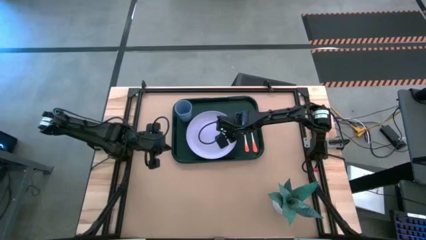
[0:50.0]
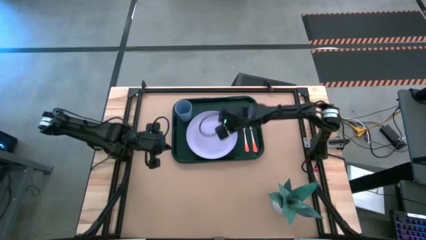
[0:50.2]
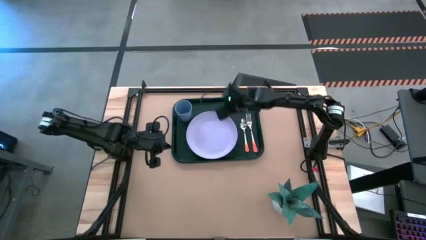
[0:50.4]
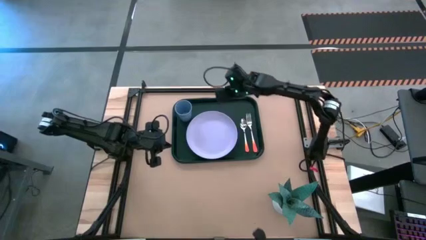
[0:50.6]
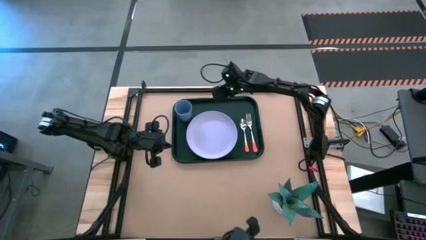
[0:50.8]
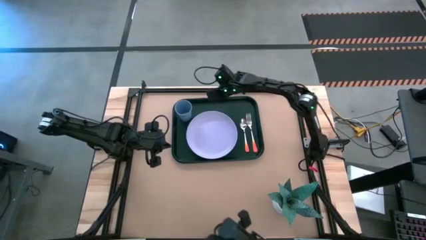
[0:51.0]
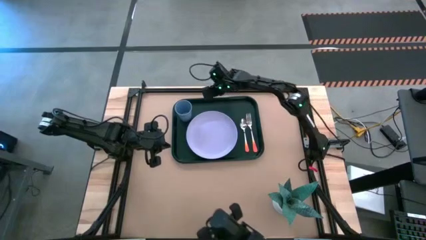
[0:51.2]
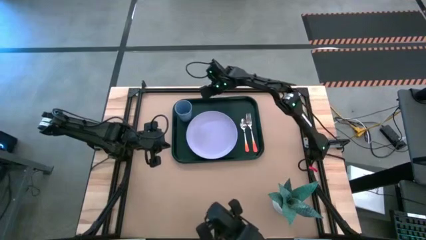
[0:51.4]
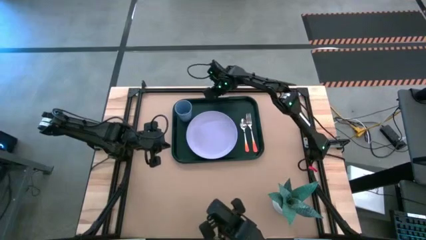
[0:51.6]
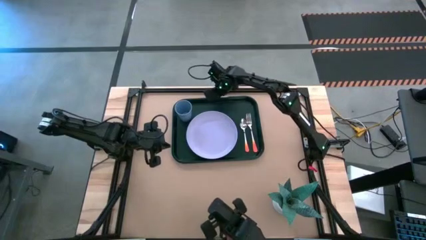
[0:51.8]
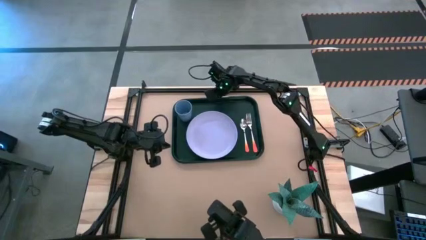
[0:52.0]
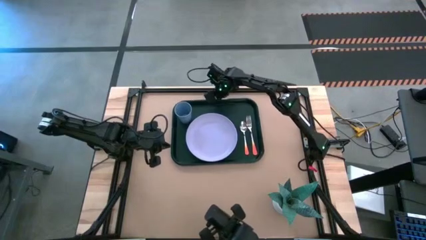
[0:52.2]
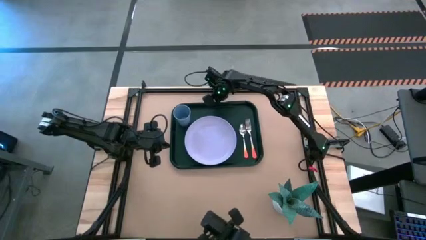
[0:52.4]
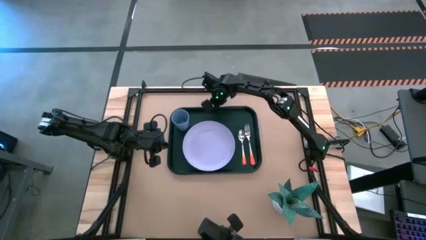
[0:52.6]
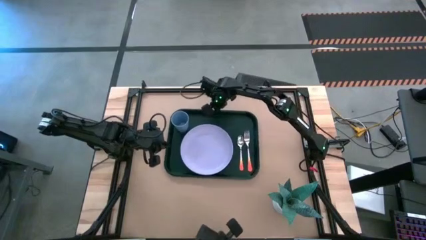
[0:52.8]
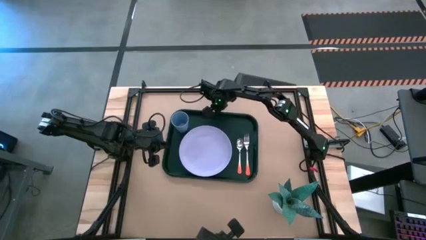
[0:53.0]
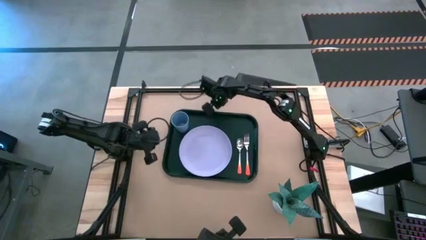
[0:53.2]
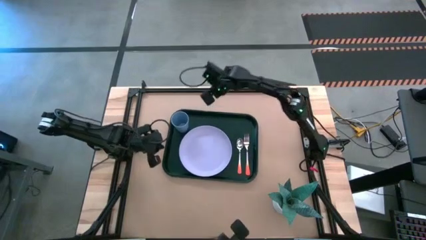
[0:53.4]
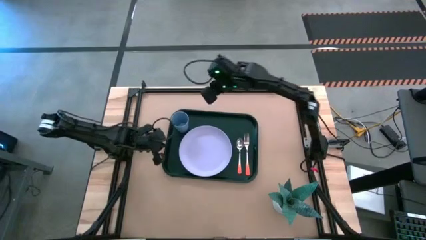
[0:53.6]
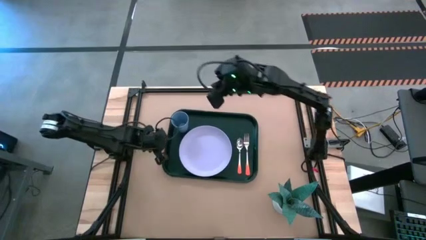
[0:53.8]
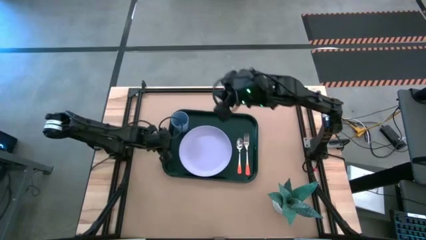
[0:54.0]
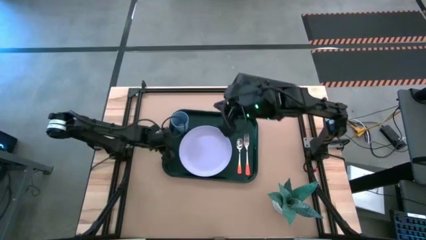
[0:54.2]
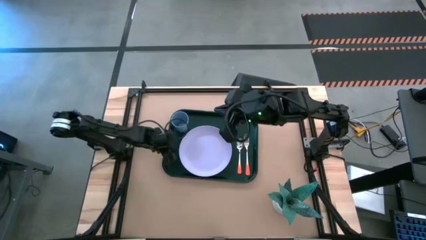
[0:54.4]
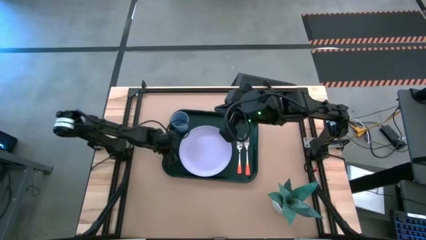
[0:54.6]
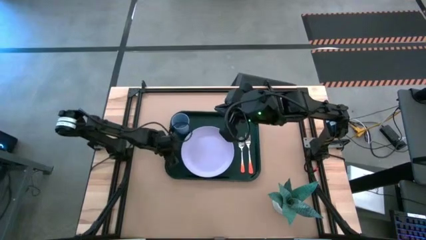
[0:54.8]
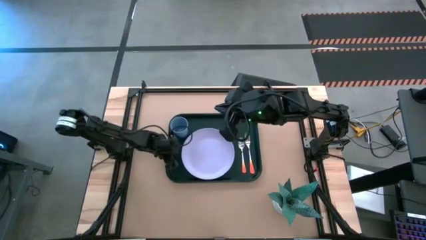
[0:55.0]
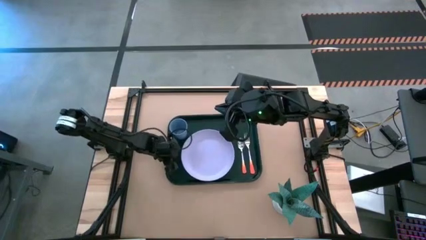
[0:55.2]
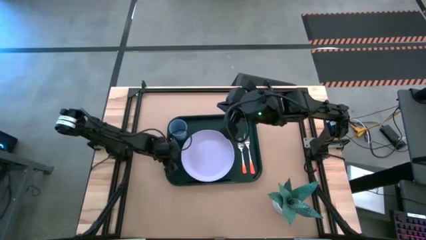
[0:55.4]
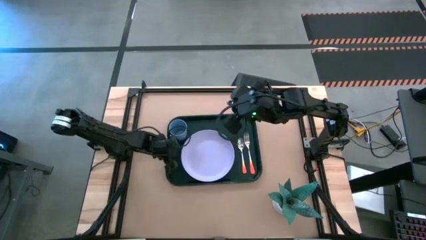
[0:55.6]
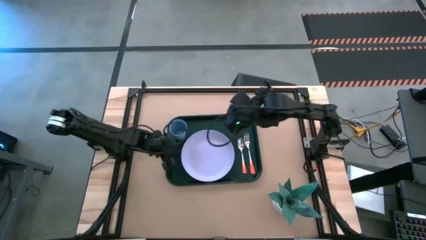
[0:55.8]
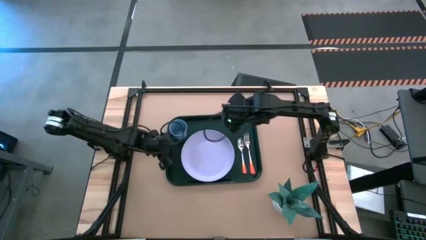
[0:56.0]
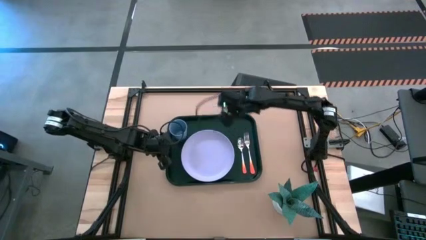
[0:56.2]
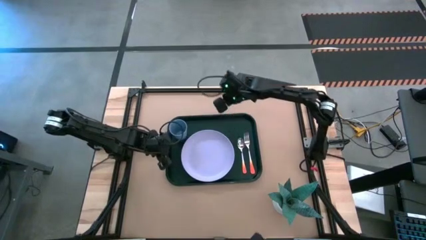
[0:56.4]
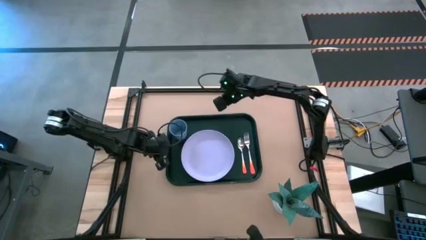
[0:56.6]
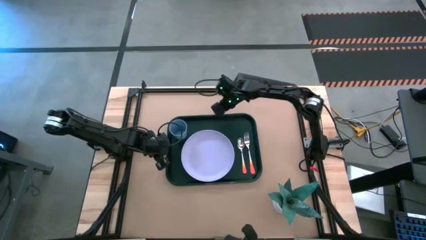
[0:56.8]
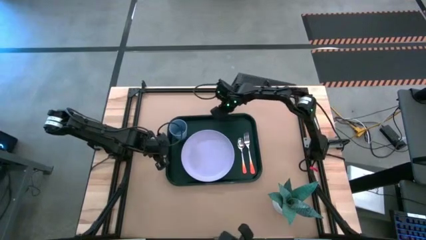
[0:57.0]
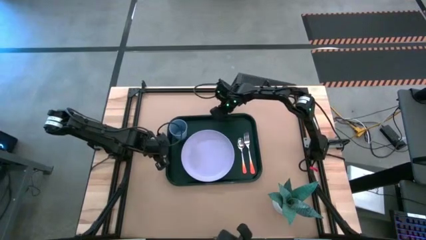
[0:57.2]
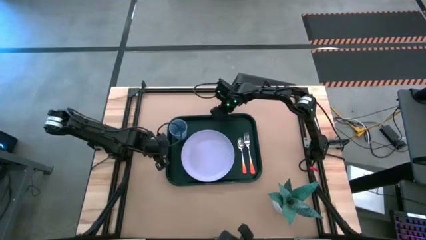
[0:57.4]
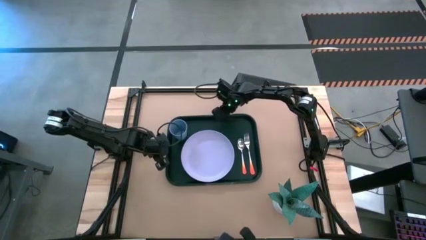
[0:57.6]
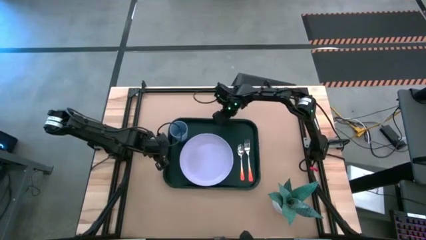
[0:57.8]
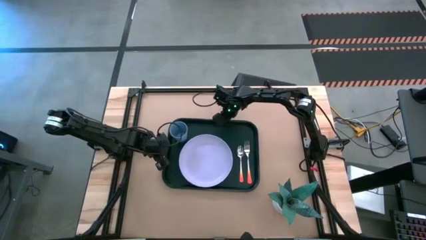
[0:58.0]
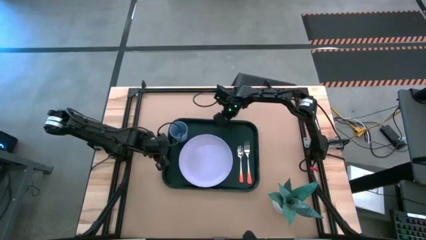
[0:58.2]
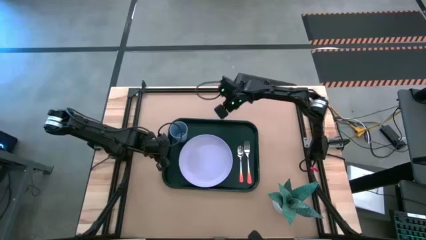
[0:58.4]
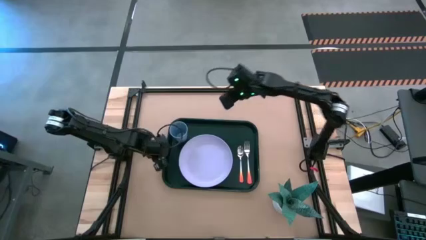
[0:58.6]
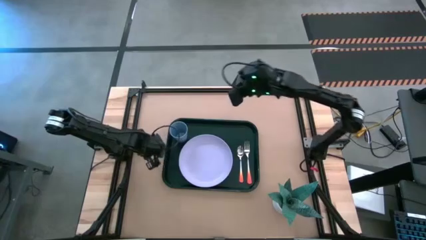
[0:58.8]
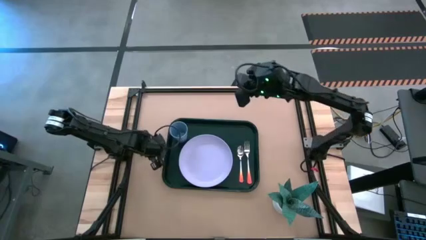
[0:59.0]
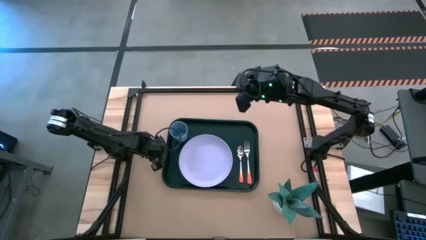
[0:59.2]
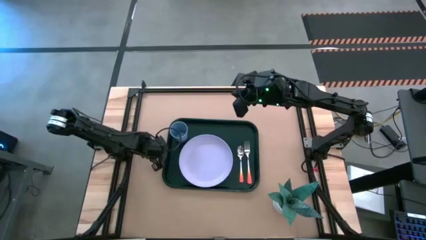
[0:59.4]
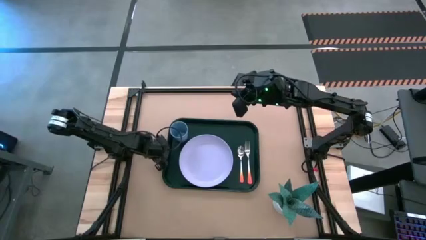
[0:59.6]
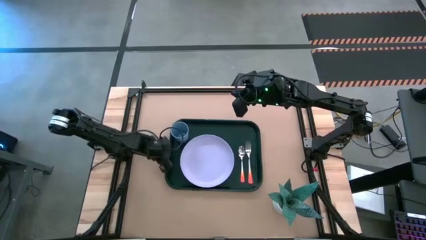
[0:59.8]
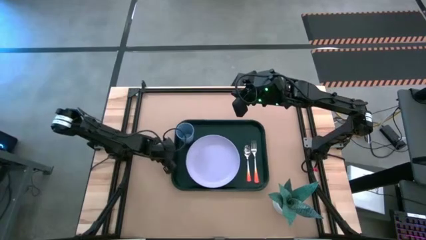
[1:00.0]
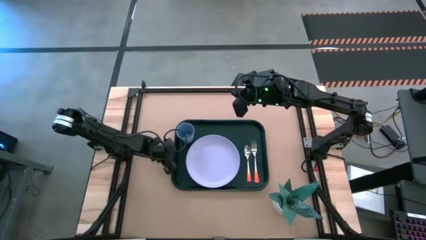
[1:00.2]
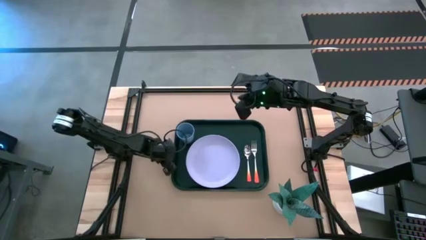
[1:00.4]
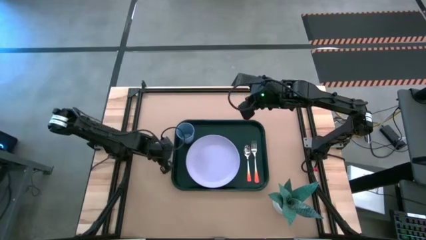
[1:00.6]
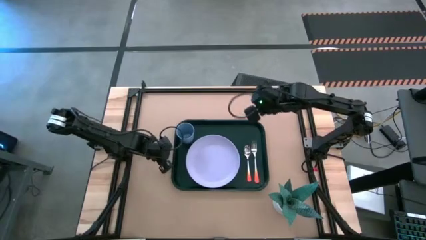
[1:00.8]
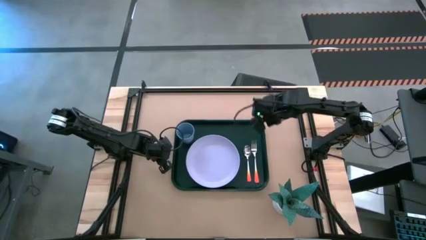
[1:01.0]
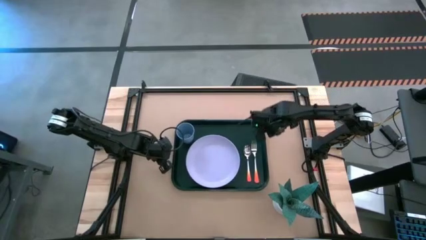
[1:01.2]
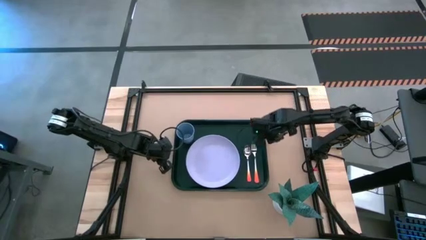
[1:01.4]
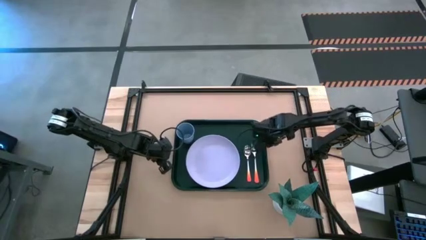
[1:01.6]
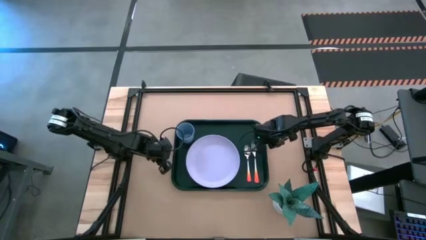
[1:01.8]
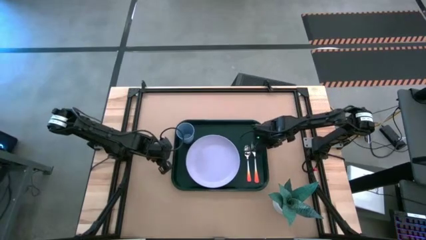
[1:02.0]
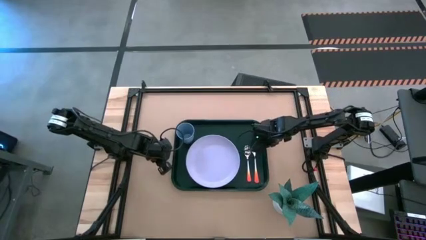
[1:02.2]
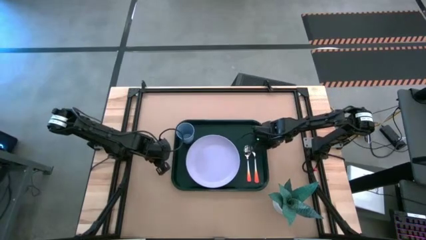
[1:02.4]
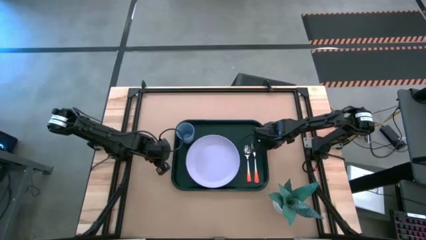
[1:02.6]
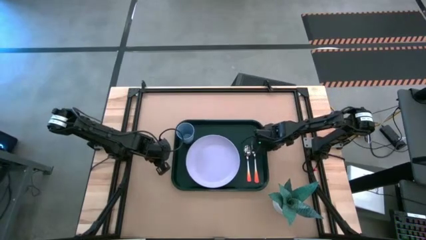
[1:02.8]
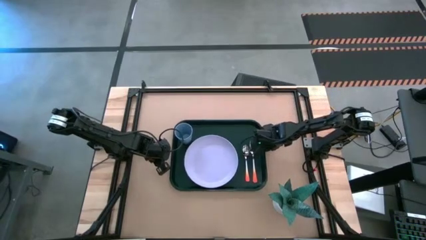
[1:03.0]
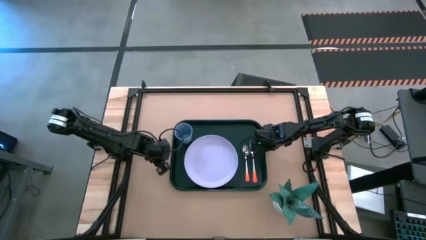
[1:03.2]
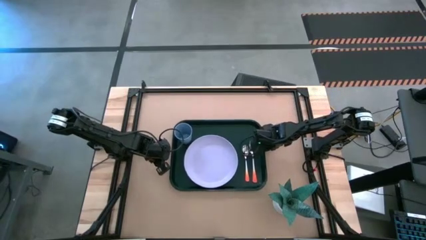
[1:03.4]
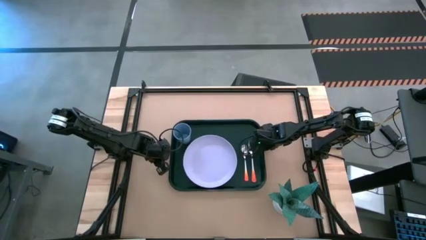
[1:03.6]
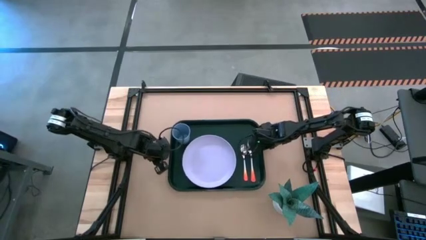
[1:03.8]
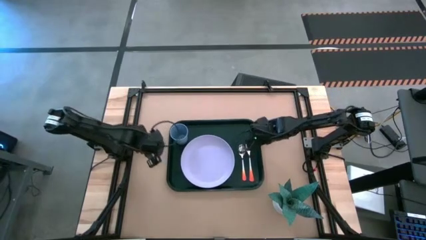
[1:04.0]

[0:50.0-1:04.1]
Task: Pick and place plate/cup/fork/spoon on tray
Move the black serving tray to the middle of the table
